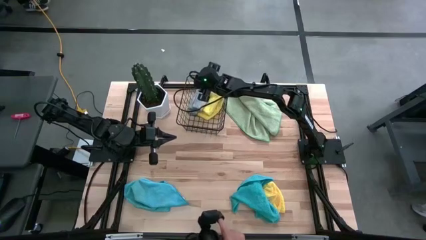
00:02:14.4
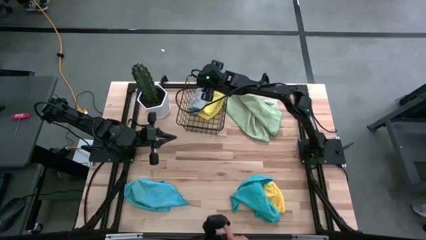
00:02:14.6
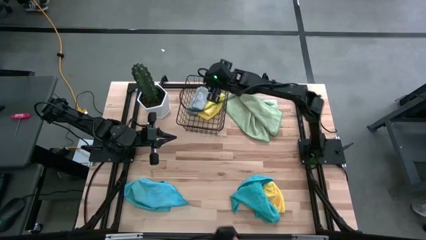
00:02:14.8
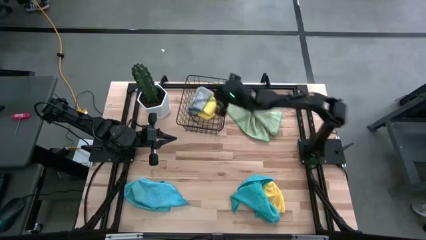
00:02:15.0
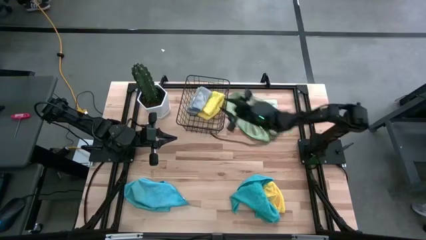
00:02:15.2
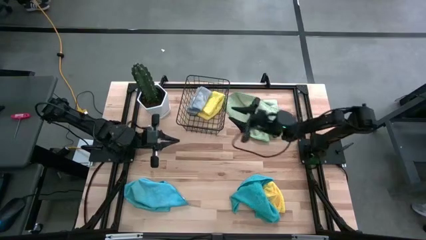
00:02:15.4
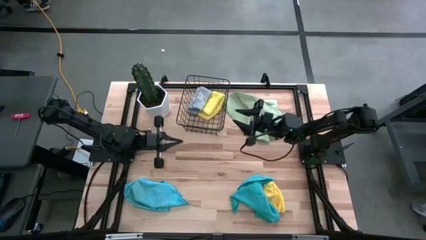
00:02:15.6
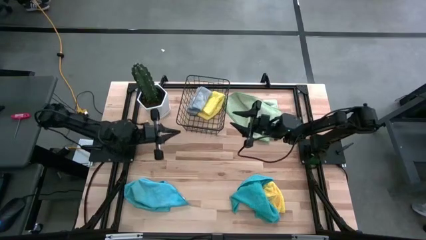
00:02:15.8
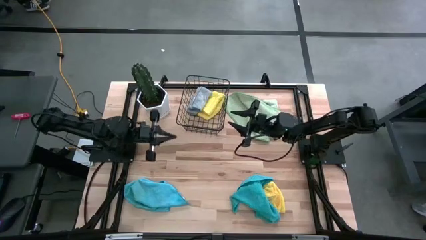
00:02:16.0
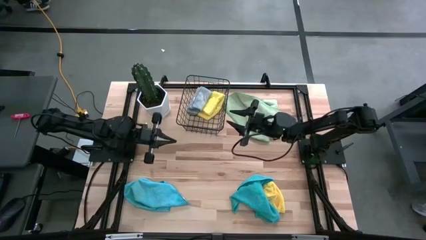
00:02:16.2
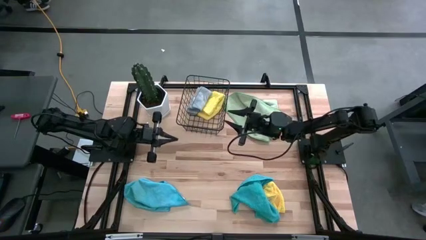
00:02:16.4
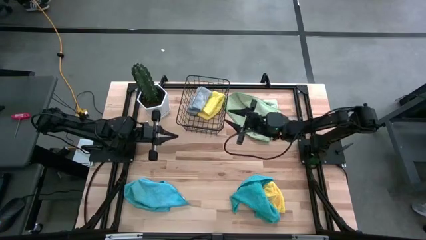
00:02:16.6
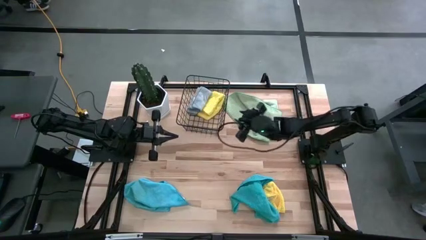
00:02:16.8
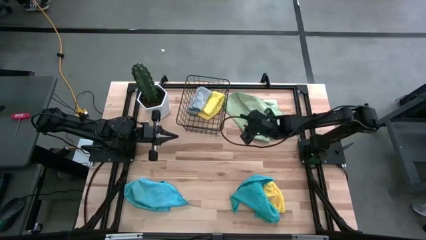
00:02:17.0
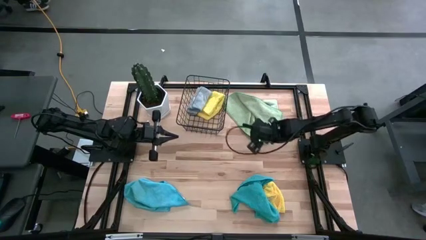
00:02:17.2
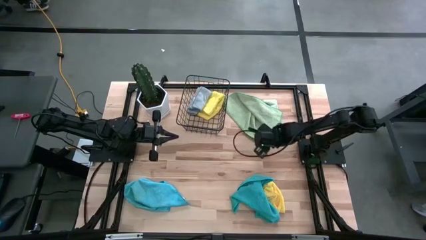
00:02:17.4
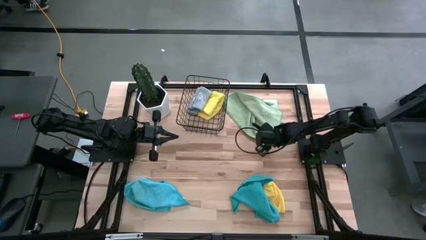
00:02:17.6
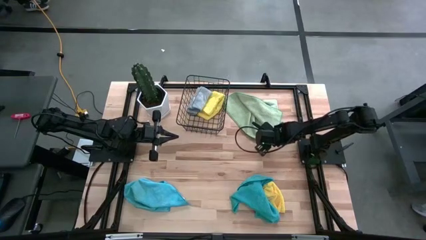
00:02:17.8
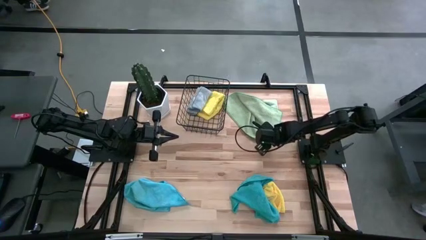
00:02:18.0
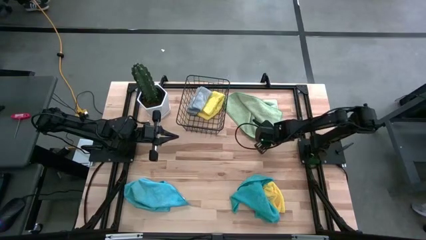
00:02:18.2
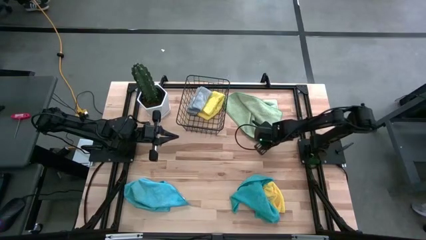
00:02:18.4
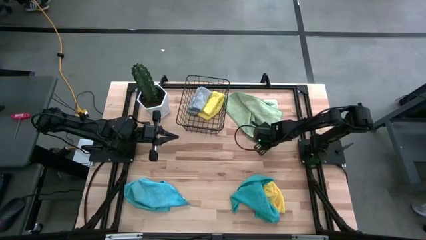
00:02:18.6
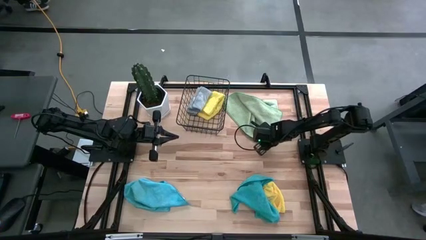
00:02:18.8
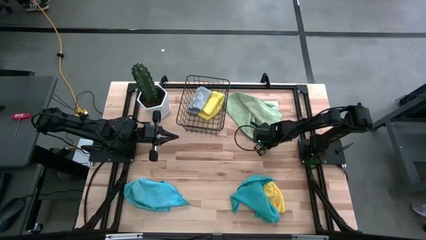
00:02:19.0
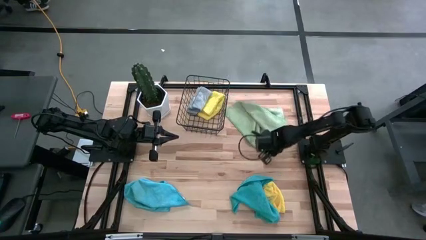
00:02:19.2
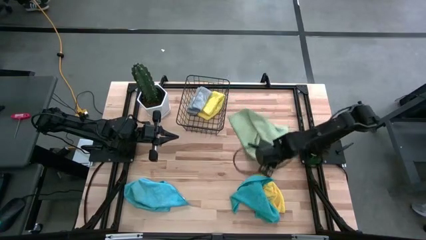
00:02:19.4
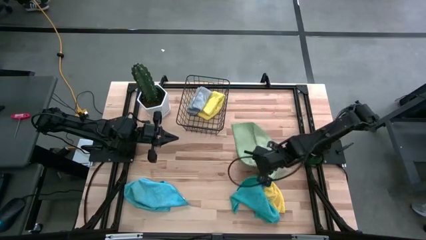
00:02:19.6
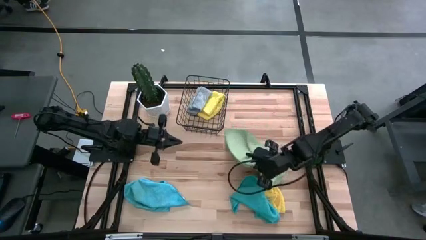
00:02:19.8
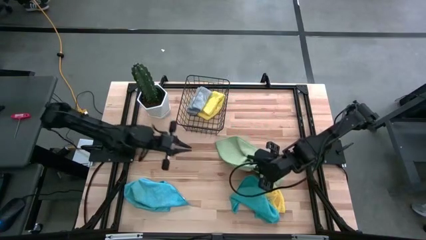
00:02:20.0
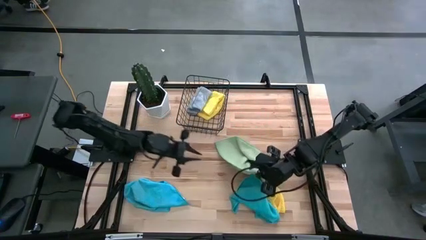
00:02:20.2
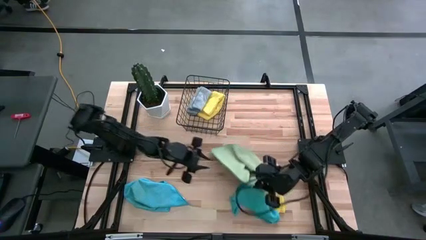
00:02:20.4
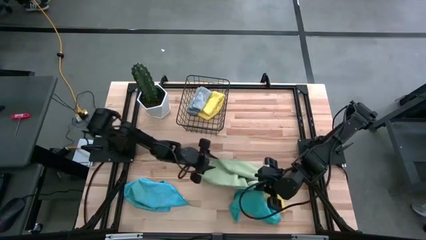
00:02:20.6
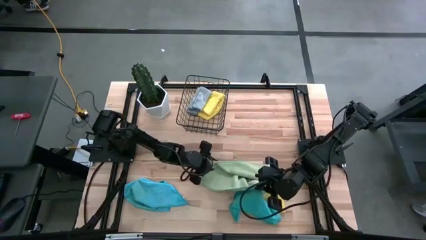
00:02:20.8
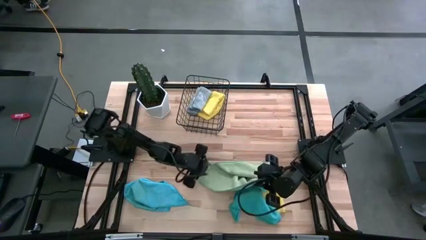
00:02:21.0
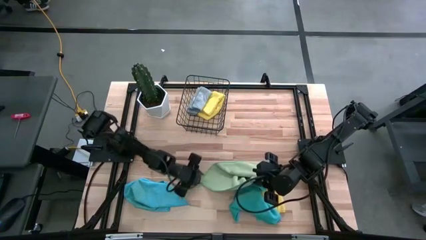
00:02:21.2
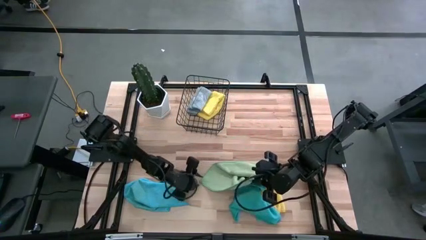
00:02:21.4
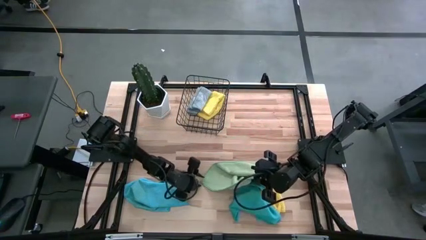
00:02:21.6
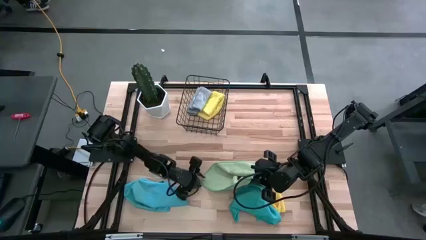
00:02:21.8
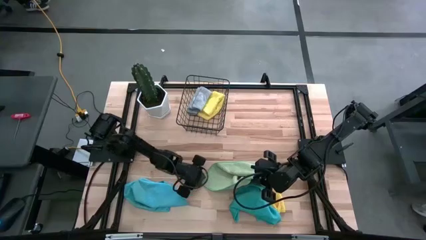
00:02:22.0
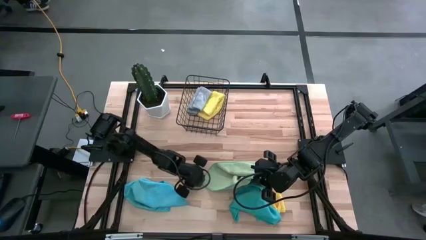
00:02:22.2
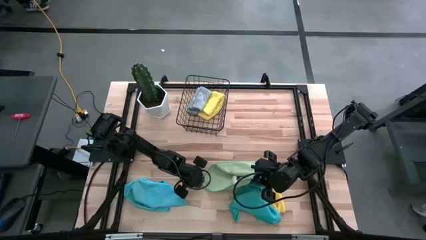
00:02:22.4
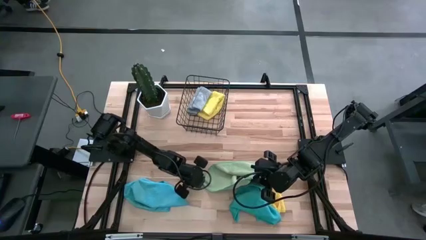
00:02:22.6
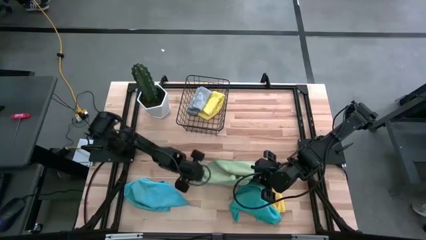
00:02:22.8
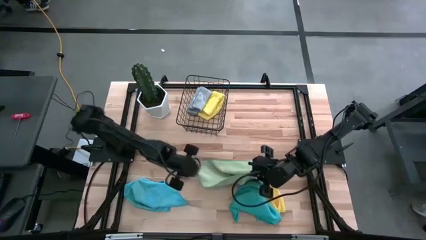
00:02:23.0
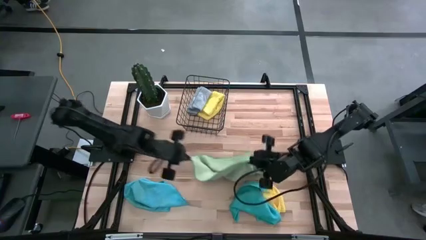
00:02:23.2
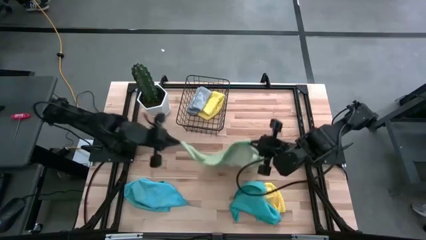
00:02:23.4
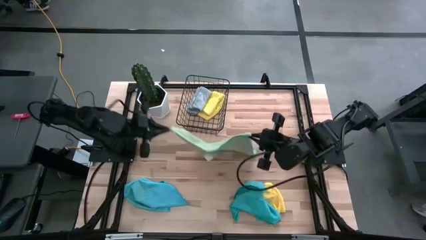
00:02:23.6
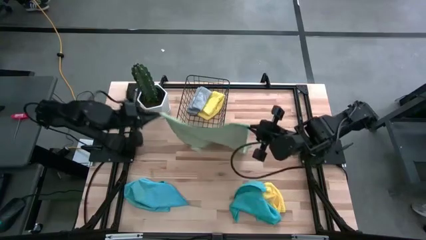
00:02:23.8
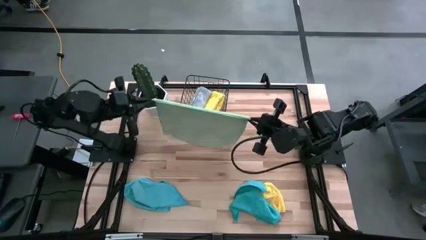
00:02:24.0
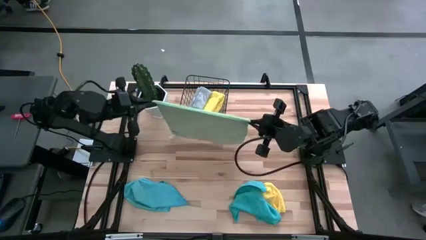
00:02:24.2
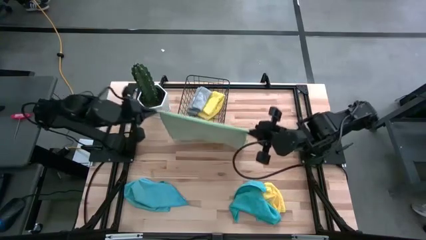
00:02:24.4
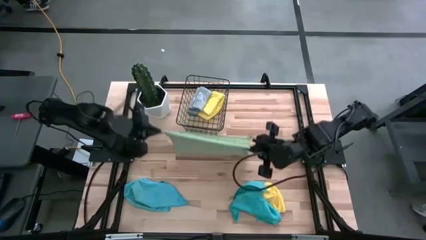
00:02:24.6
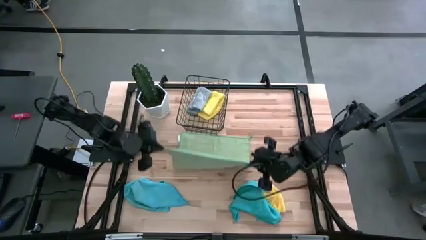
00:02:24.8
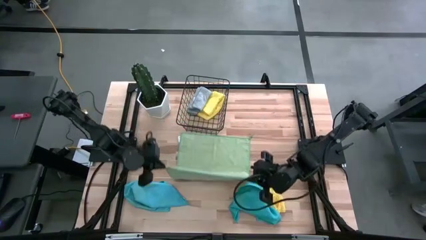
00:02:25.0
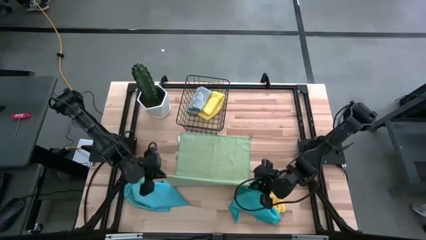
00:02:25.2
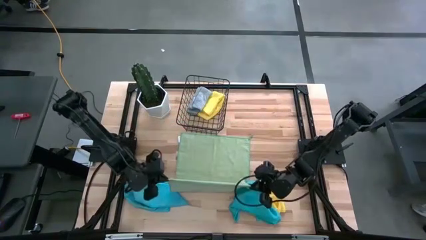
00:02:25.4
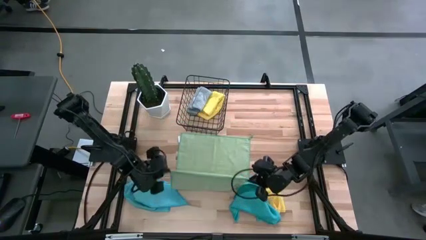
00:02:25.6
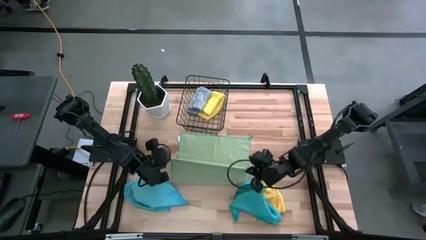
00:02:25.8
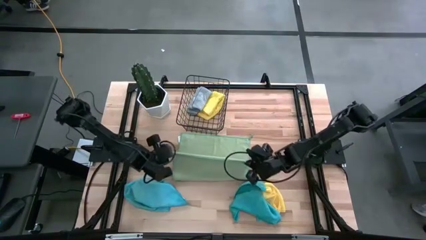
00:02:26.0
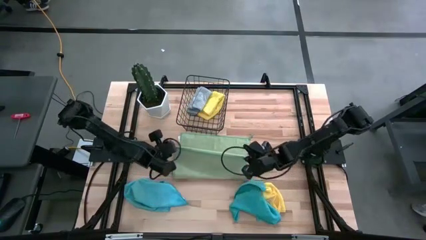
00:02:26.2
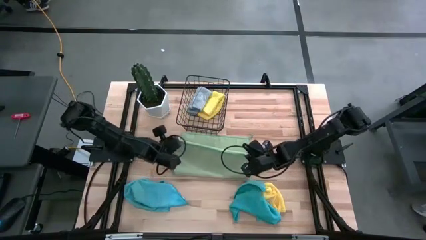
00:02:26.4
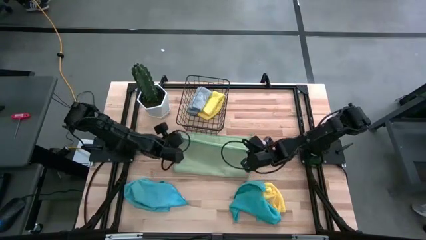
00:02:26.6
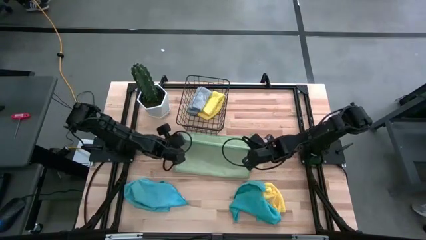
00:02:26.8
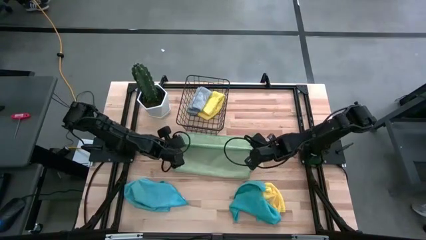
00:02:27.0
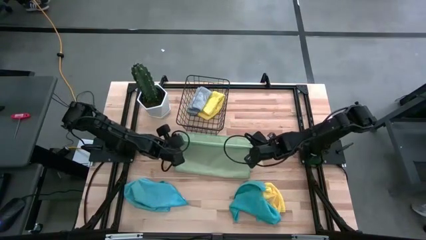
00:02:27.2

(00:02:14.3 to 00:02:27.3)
Task: Fold microfiber towels
Fold the green microfiber cloth

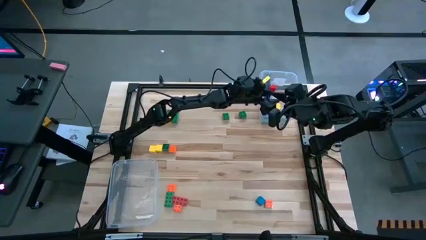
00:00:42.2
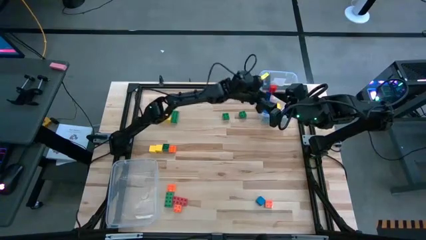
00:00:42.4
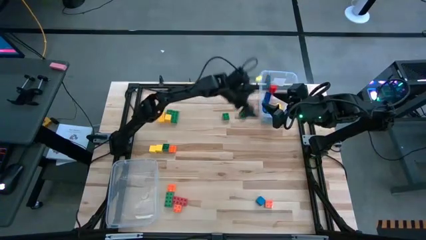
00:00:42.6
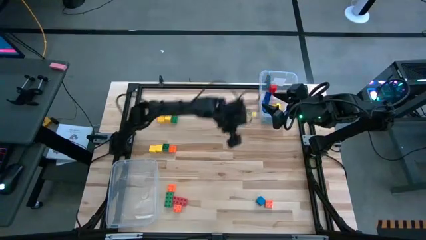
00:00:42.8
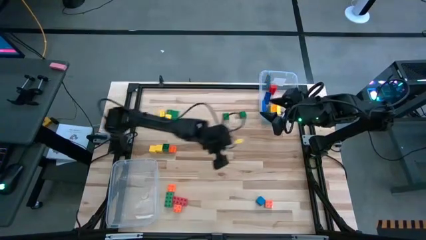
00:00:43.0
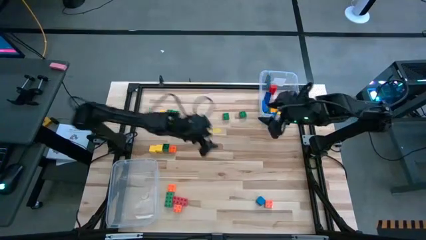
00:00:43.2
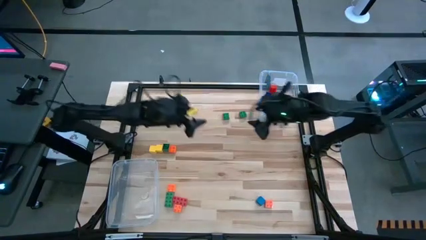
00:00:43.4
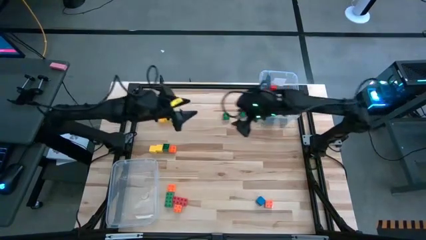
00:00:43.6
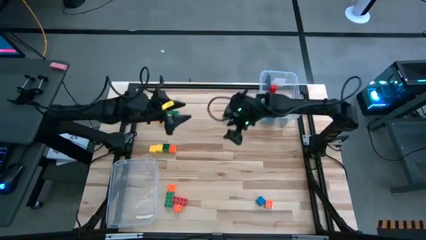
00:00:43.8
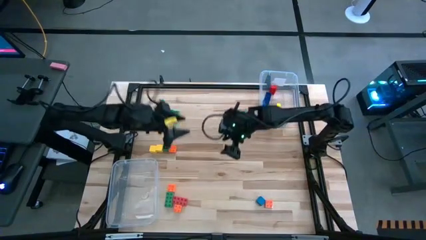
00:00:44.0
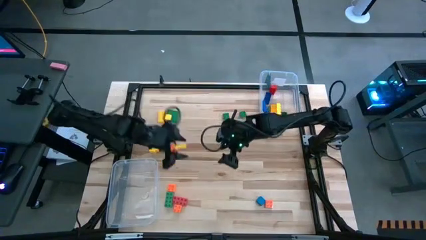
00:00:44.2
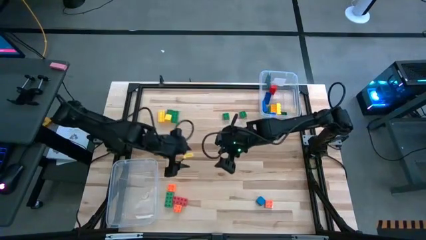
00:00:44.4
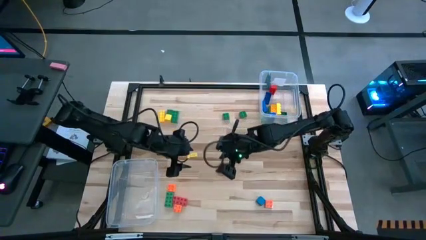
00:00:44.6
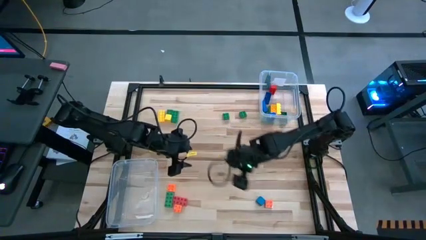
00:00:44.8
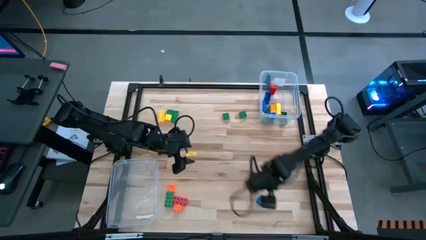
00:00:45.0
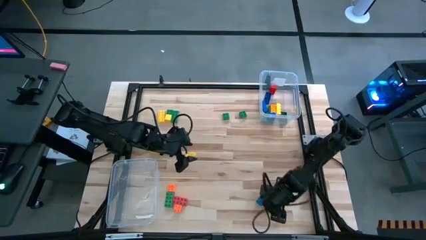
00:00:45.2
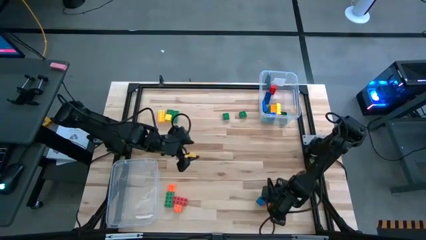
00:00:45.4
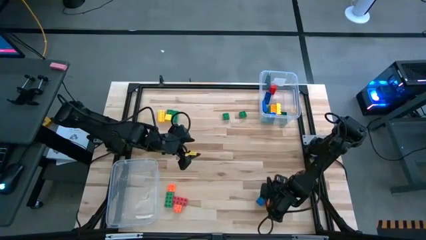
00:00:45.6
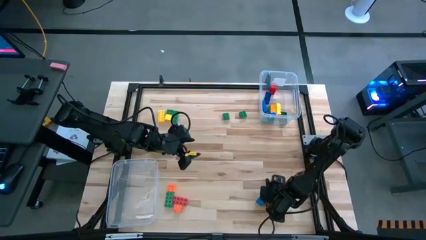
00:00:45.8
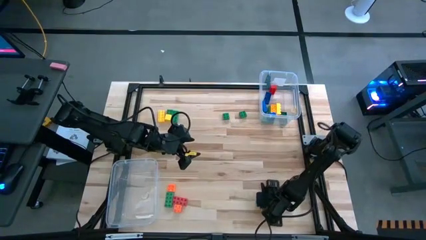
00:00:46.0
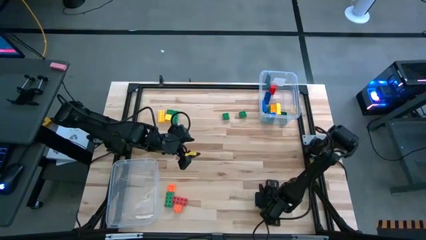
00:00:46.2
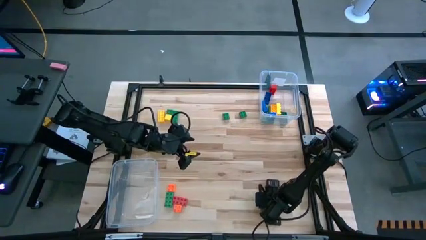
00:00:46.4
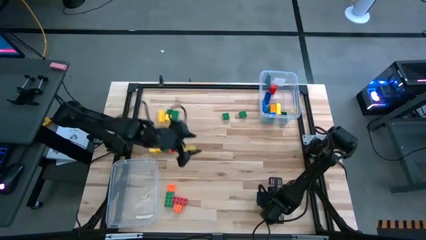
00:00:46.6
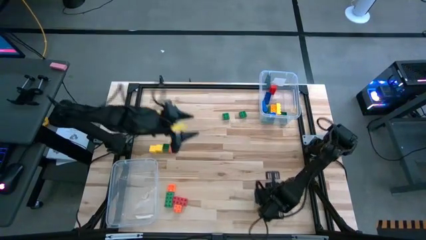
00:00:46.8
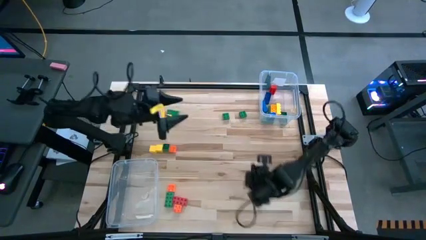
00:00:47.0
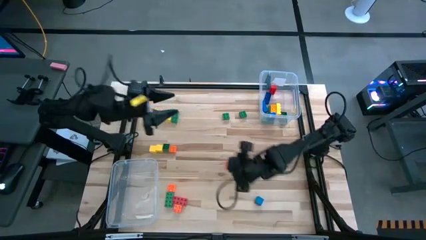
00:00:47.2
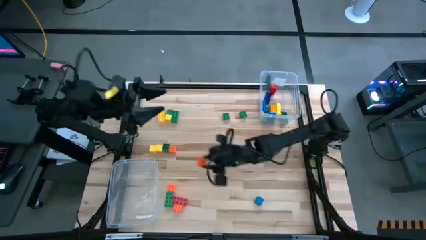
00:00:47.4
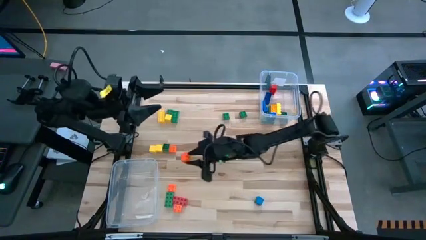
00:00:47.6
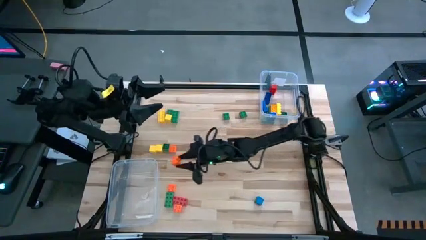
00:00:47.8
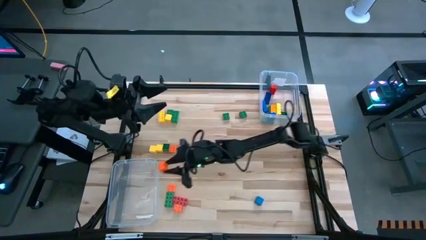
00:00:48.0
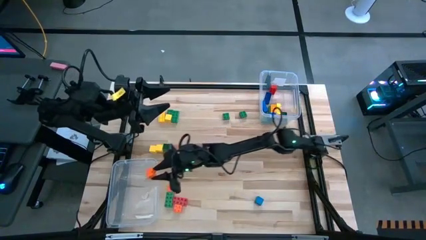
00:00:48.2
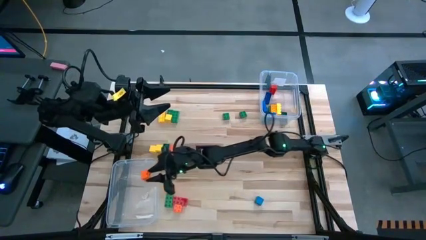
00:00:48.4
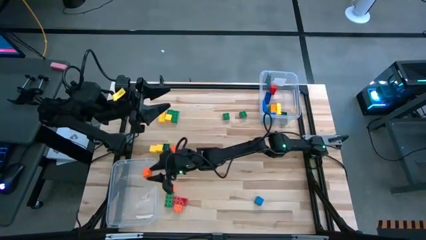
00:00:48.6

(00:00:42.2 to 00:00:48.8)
Task: Sort blocks by size
Put the bottom right small orange game piece into the left transparent bin
